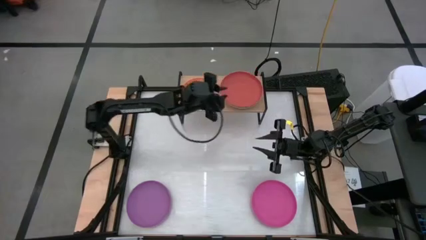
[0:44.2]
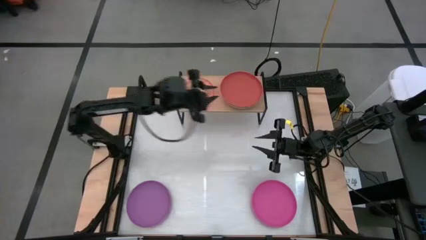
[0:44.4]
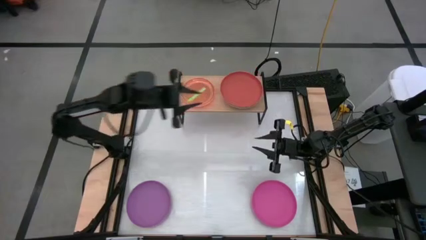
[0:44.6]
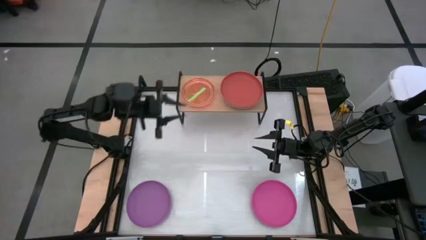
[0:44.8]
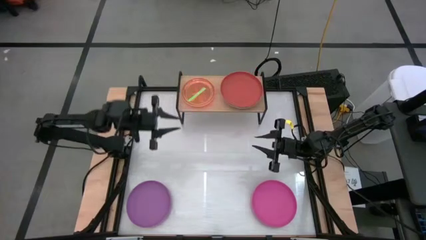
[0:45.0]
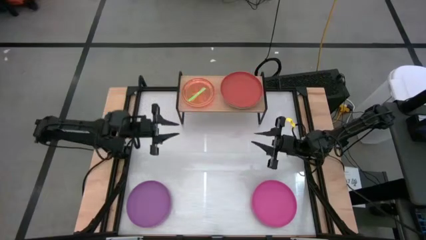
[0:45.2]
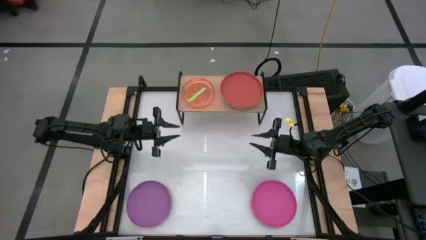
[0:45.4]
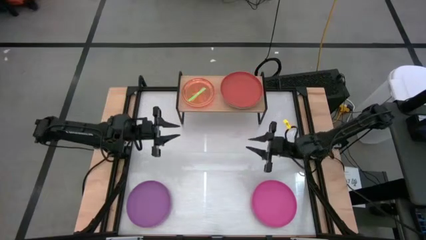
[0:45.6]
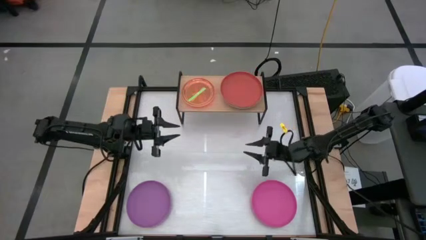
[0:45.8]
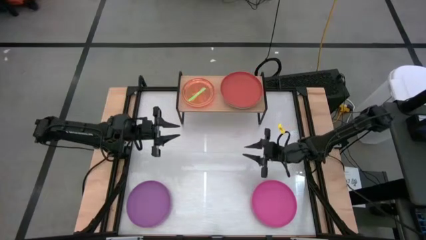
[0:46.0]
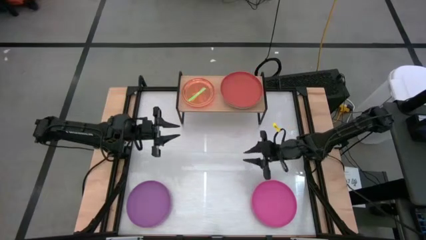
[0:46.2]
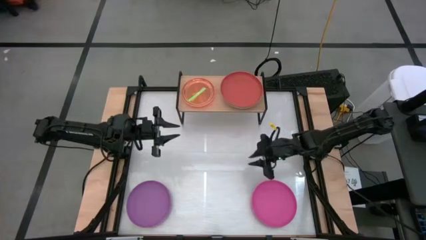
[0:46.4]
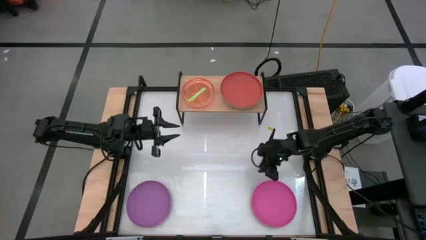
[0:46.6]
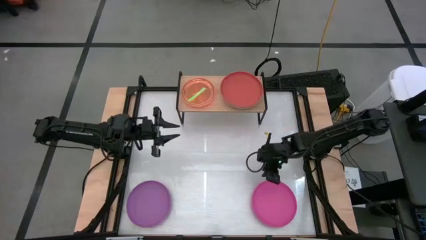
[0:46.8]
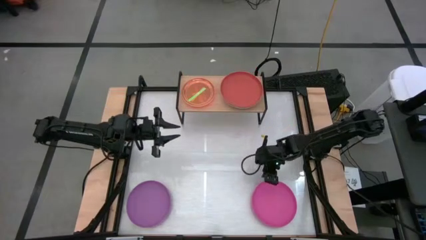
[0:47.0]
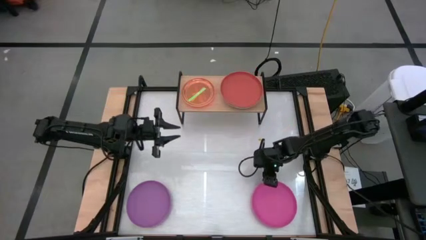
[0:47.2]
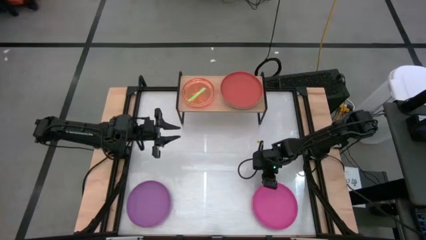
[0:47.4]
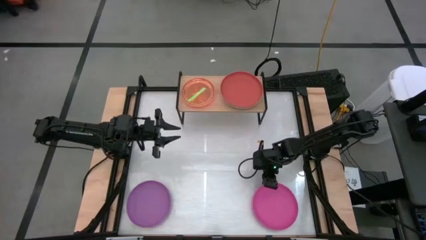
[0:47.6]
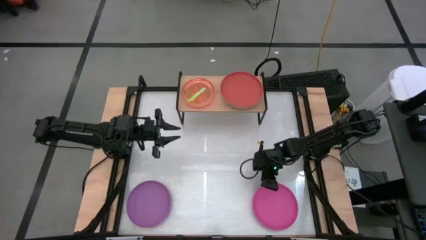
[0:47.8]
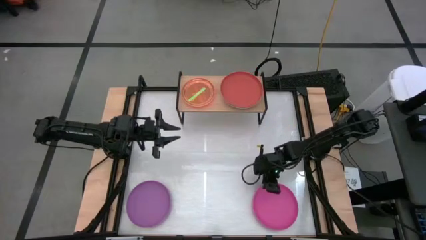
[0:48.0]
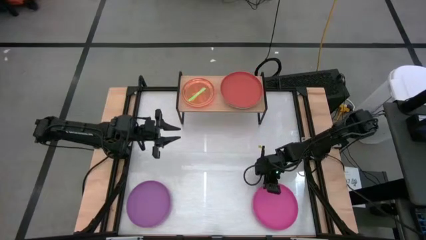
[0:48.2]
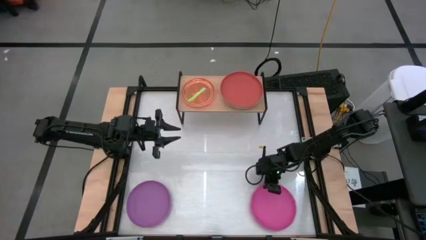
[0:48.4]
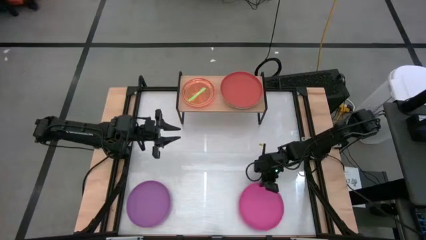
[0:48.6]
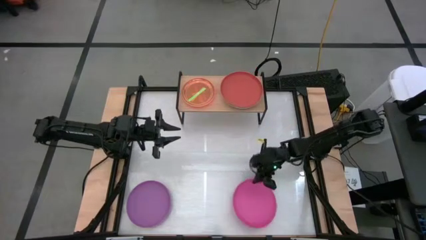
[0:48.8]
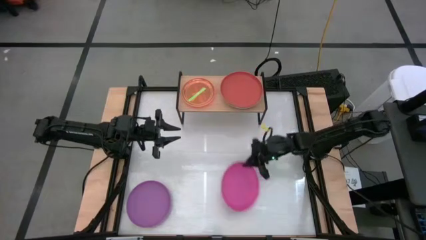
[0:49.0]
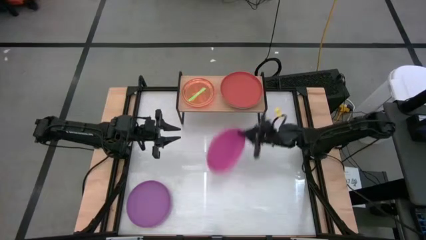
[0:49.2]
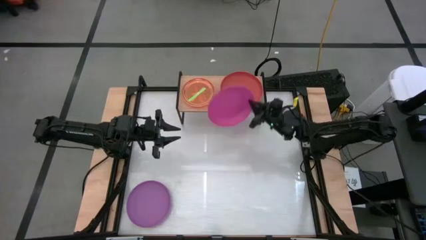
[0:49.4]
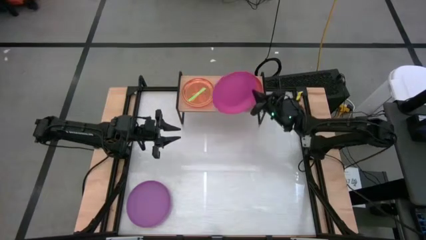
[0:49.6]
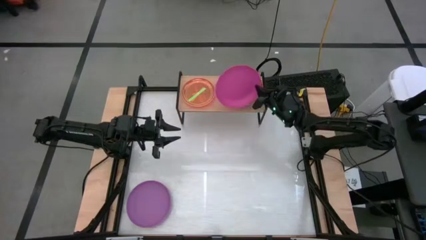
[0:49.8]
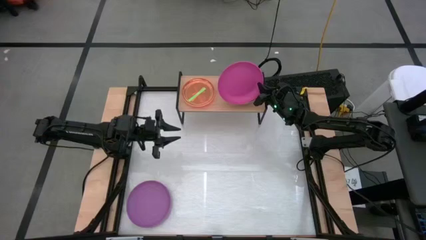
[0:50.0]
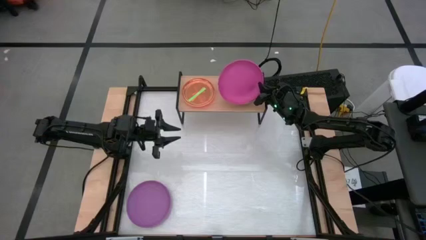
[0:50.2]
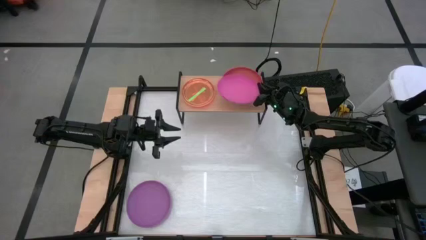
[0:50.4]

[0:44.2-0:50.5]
Task: Place and stack plates onto a shelf
Stack the big pink plate on the big red plate on the shelf

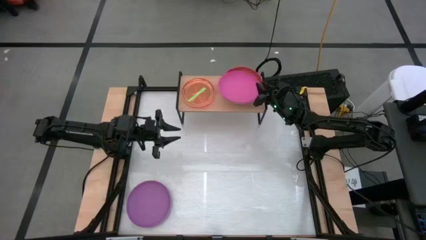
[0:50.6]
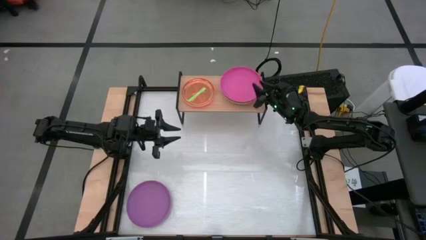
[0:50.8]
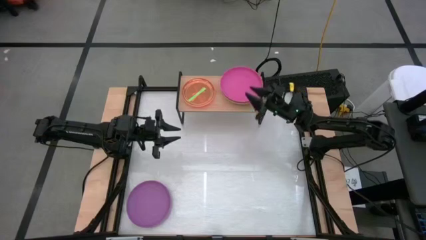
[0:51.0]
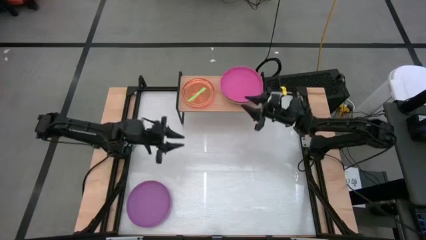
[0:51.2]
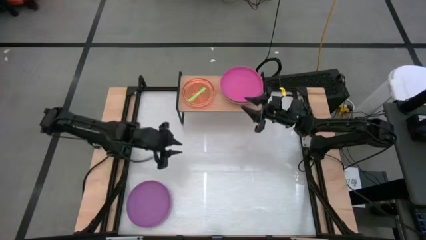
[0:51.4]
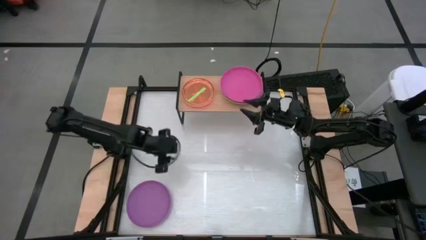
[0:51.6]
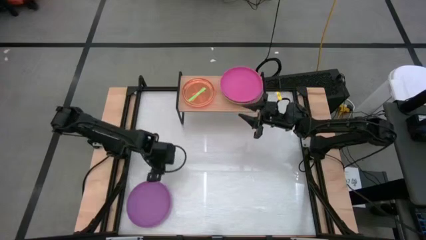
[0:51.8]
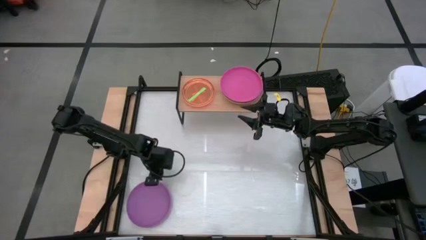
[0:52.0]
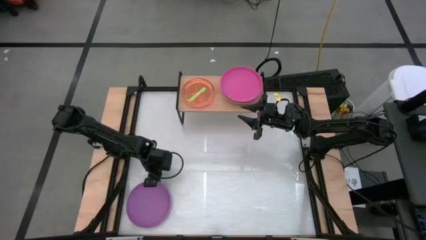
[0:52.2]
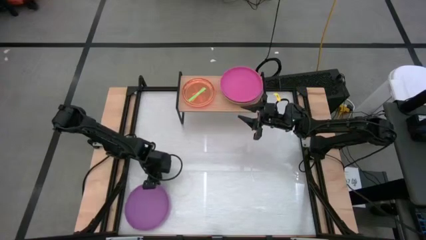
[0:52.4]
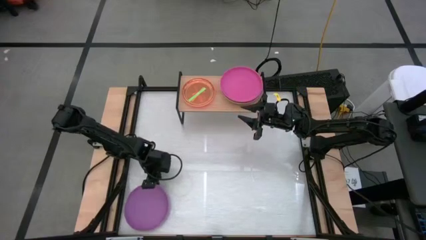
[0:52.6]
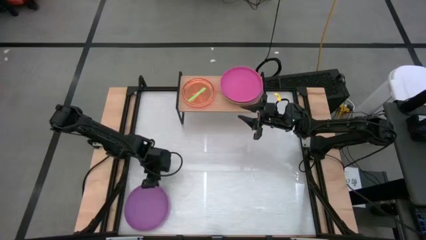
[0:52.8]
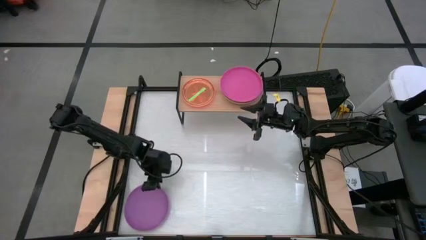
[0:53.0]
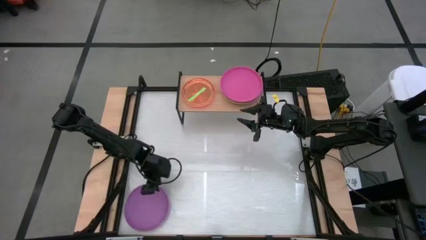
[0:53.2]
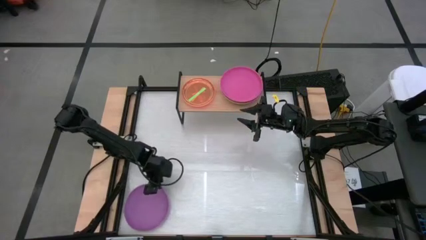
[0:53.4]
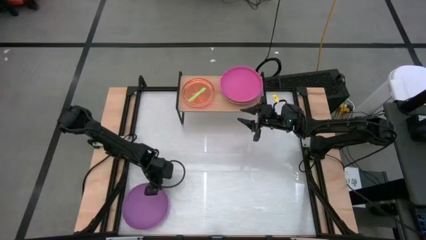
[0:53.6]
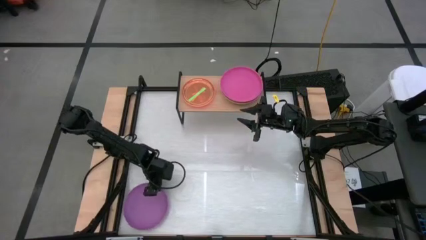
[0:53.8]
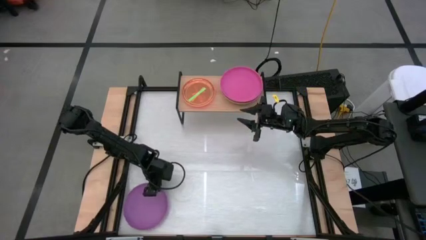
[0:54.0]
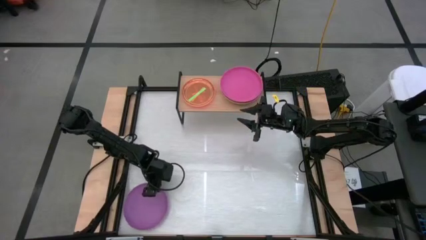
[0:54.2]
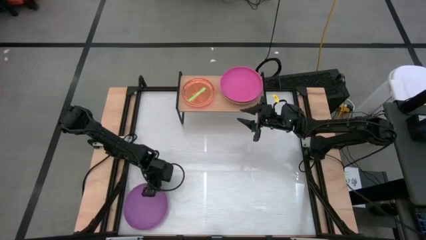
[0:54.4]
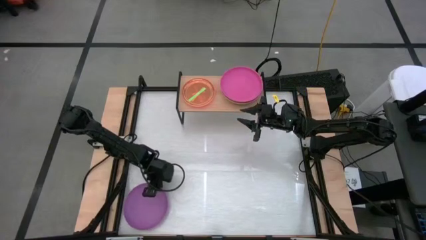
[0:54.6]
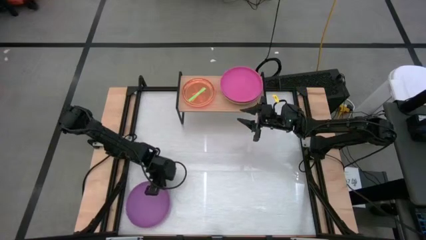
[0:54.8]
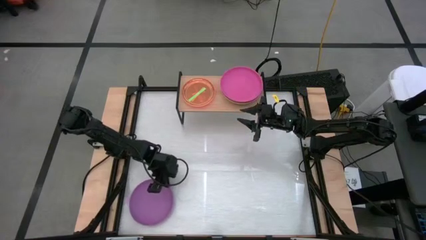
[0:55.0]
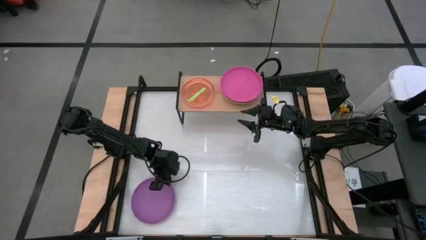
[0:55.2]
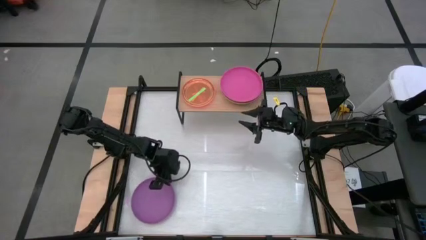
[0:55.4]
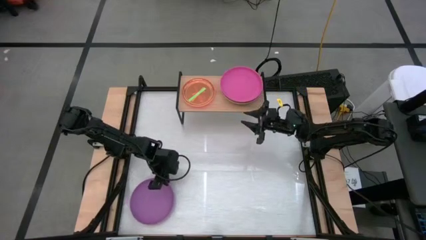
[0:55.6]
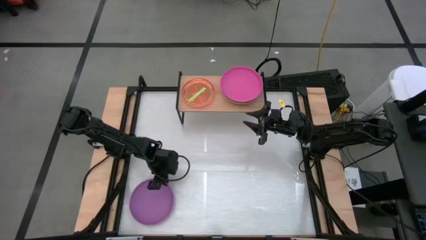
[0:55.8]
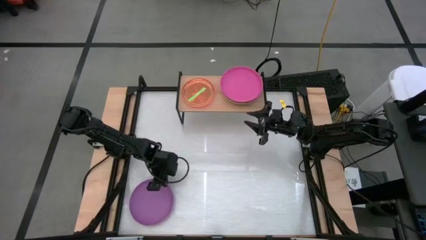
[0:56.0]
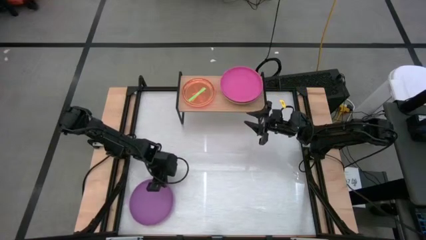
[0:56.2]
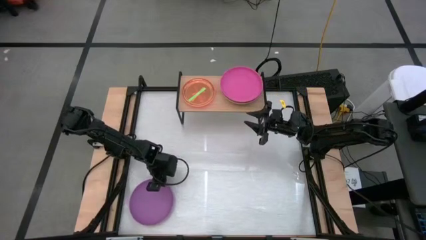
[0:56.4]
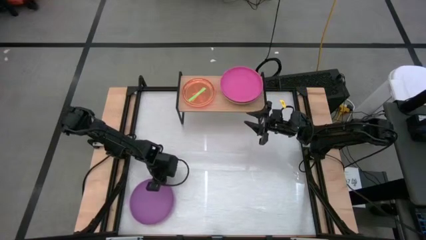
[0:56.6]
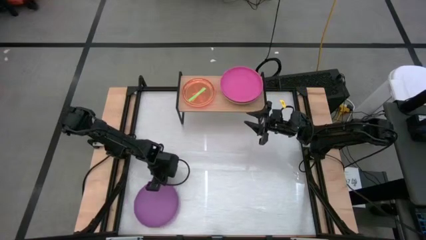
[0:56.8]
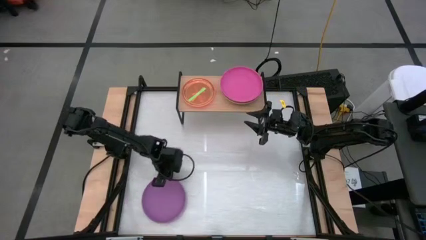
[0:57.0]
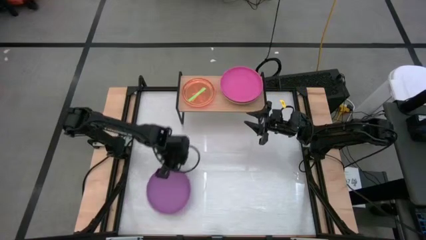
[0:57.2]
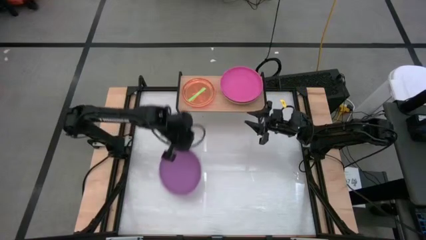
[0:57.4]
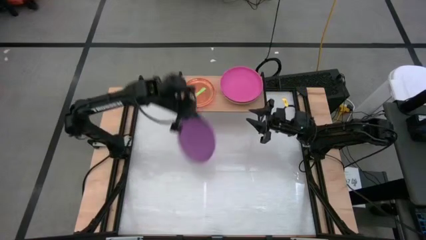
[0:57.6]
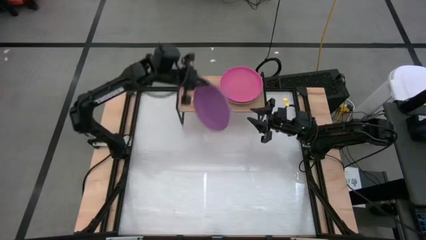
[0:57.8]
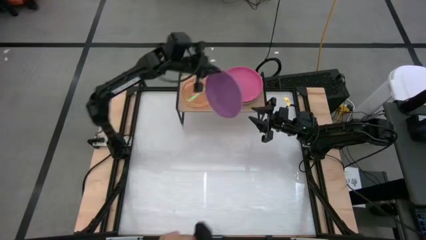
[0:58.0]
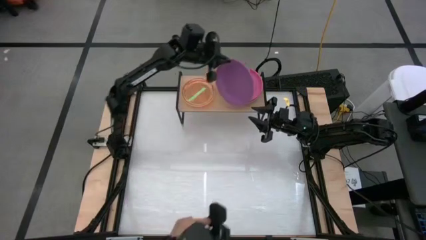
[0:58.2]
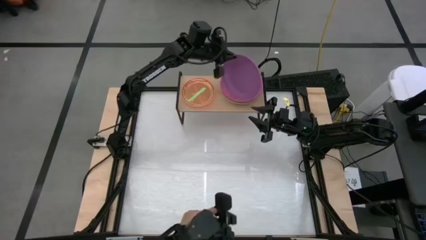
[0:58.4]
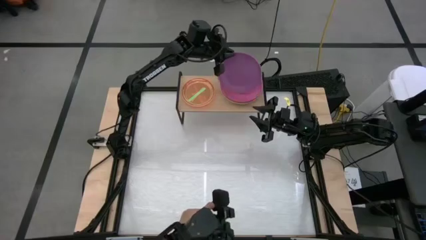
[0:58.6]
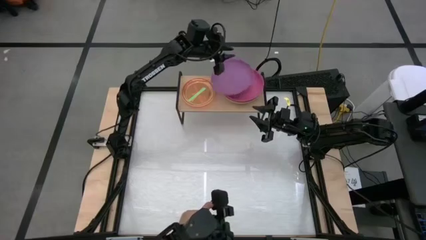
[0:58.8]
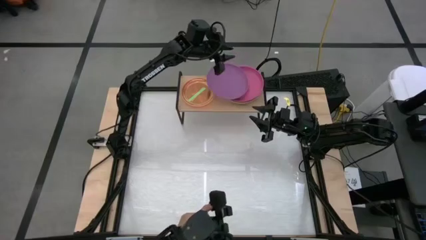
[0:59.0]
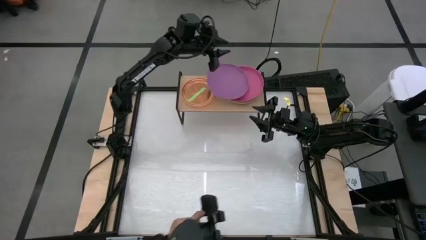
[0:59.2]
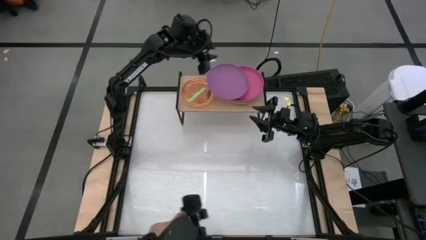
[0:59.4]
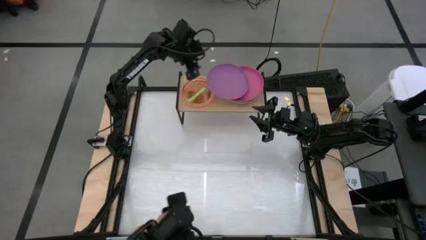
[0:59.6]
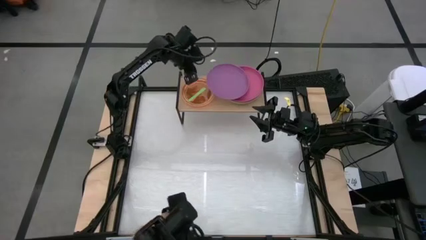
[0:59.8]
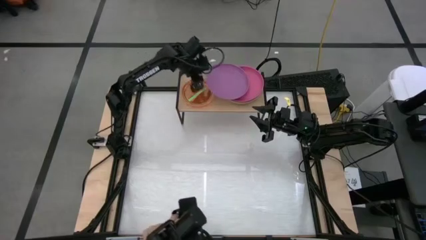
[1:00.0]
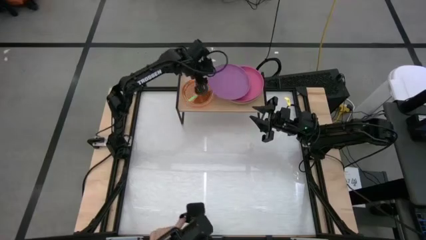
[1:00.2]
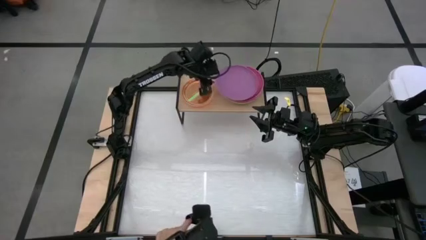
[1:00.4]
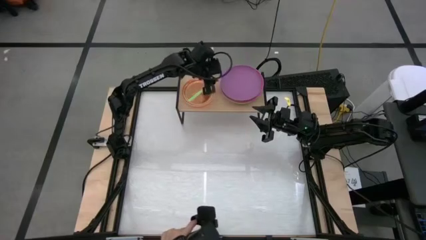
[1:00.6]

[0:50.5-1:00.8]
Stack the big violet plate on the big pink plate on the shelf

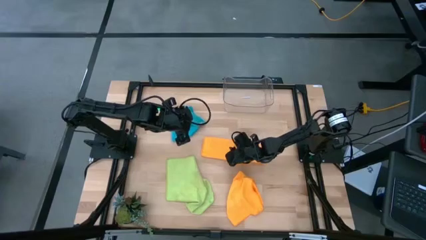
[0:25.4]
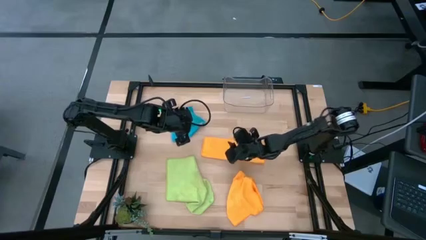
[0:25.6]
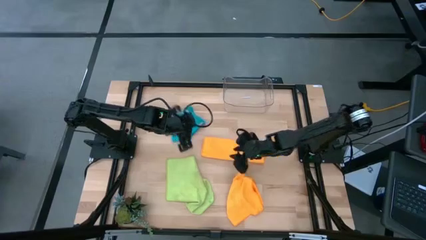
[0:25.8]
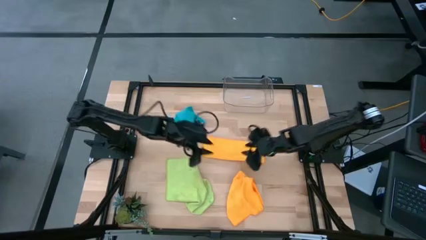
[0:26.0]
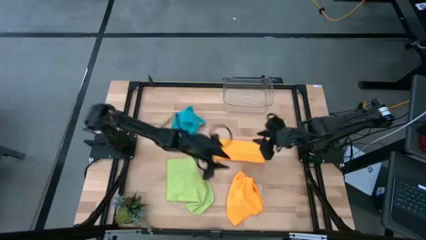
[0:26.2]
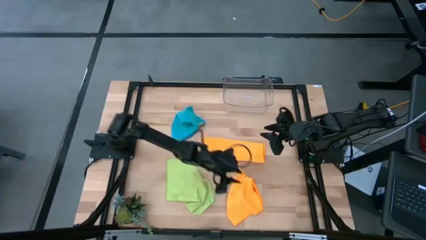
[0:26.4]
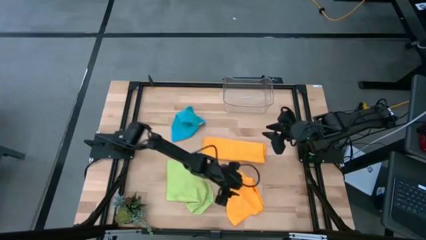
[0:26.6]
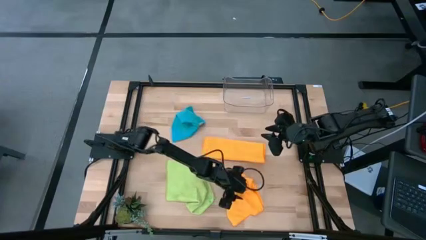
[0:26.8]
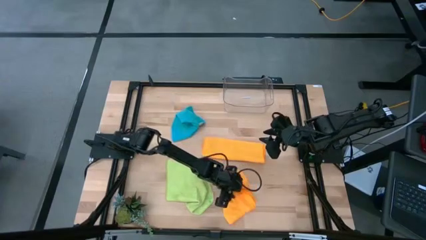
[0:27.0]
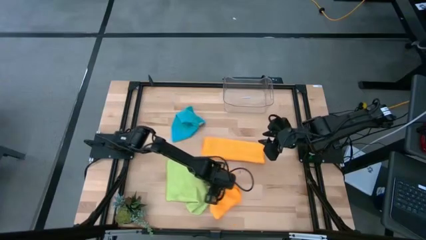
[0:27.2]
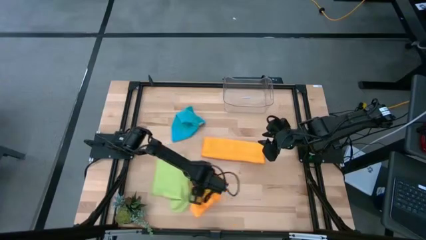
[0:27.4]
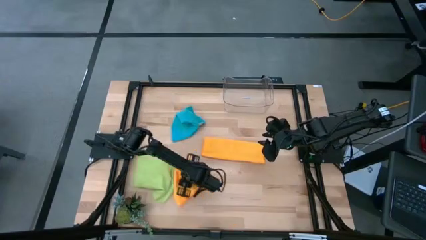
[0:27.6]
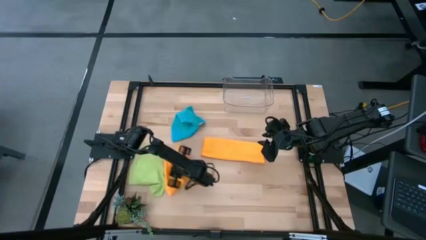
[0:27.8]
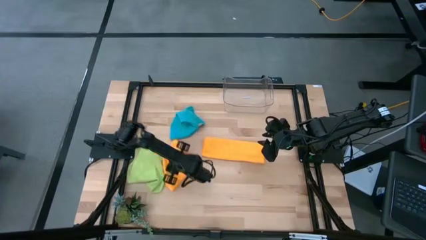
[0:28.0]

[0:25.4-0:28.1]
Task: Fold microfiber towels
Move the bottom orange microfiber towel to the center left of the table
